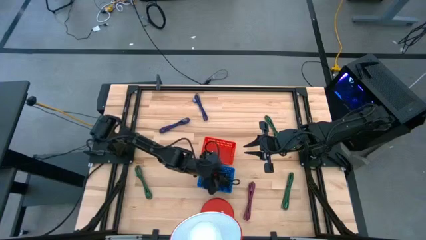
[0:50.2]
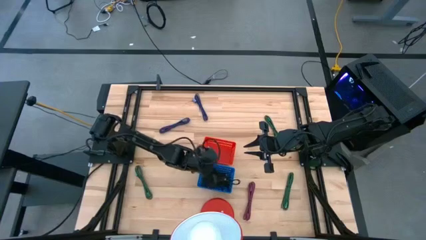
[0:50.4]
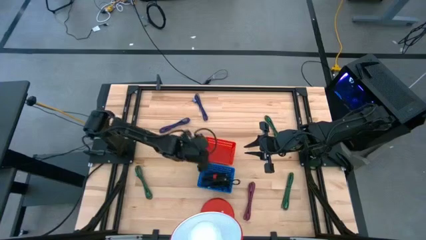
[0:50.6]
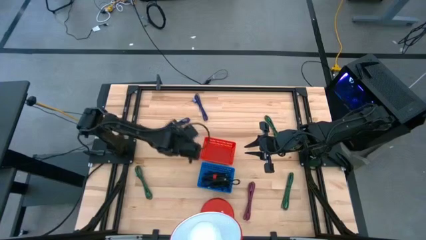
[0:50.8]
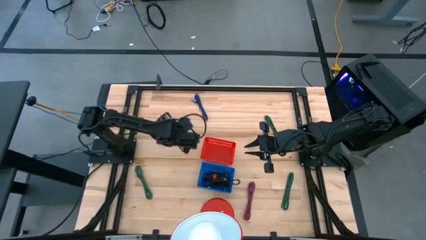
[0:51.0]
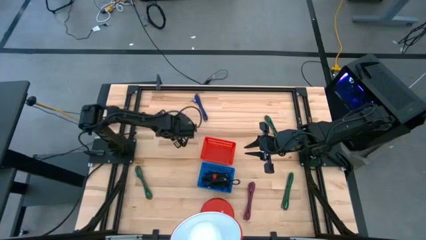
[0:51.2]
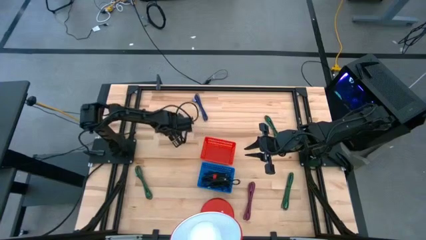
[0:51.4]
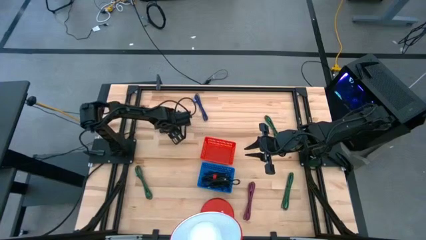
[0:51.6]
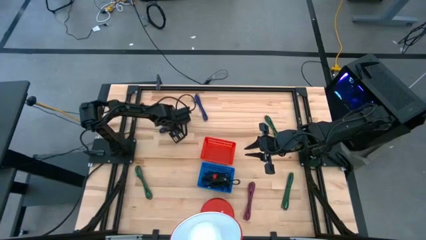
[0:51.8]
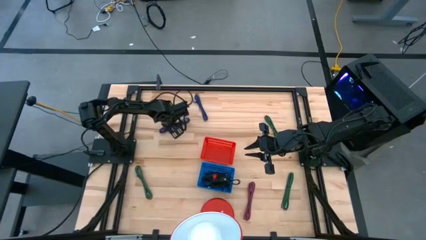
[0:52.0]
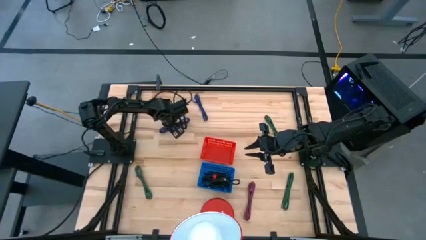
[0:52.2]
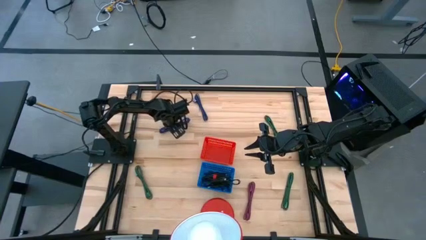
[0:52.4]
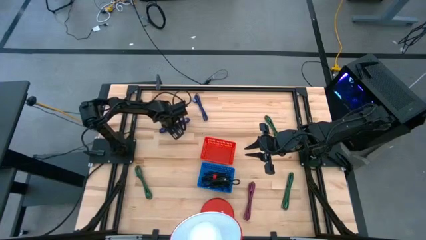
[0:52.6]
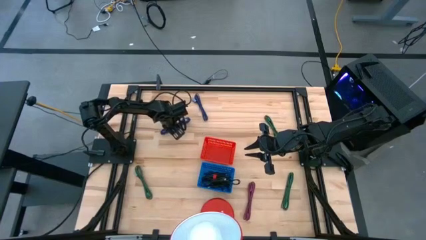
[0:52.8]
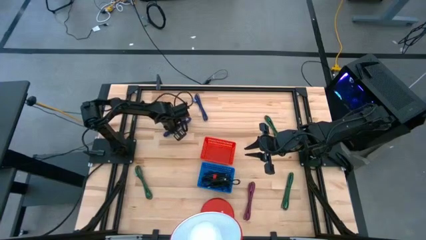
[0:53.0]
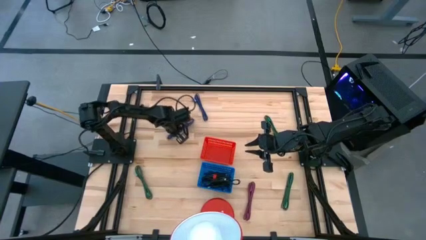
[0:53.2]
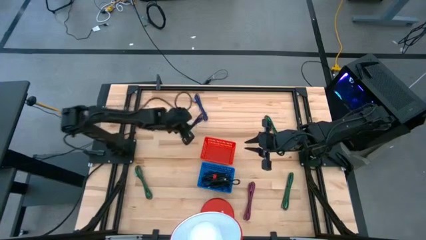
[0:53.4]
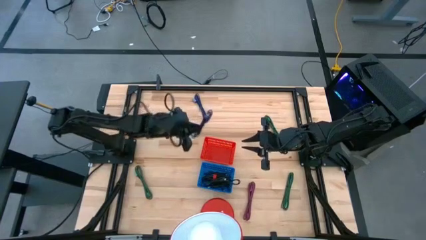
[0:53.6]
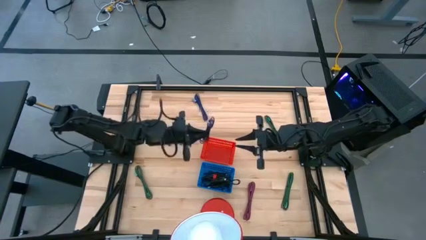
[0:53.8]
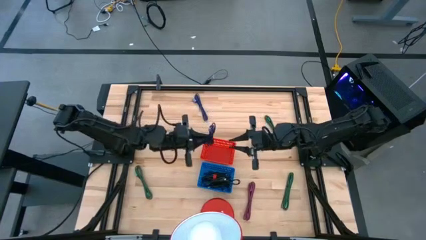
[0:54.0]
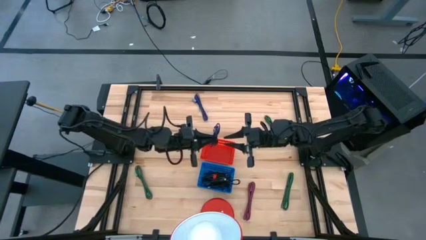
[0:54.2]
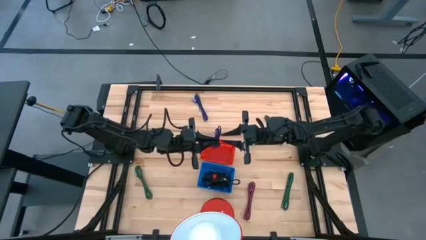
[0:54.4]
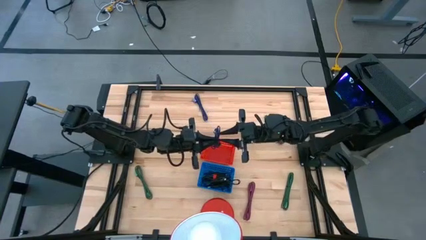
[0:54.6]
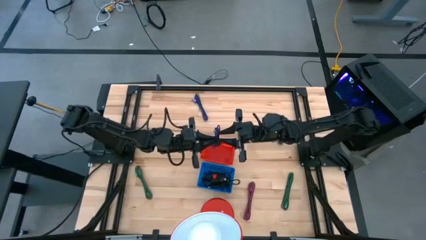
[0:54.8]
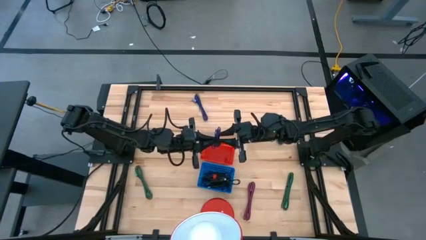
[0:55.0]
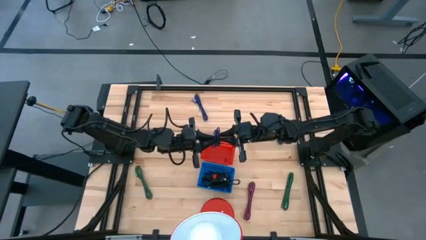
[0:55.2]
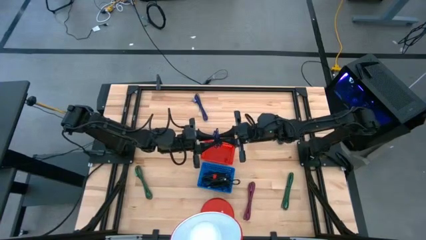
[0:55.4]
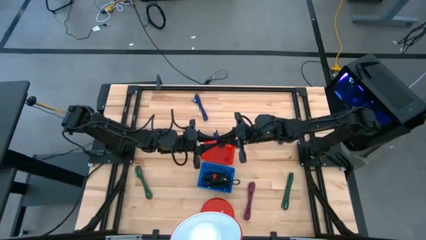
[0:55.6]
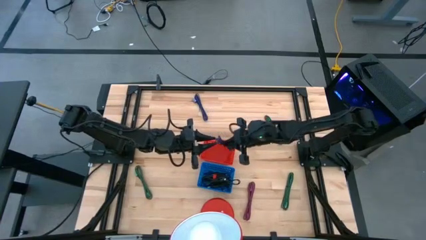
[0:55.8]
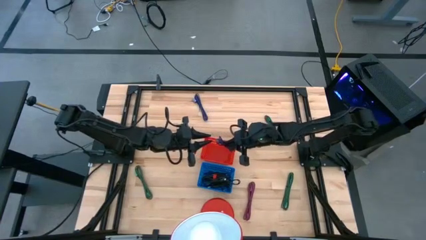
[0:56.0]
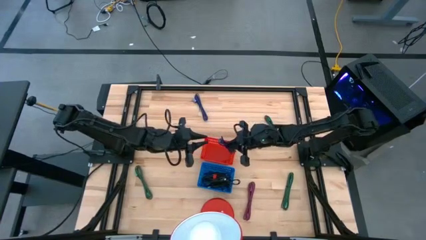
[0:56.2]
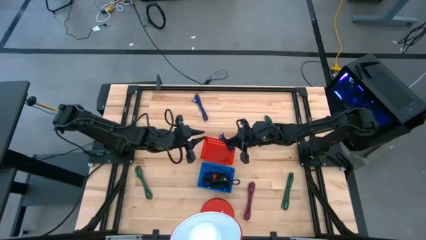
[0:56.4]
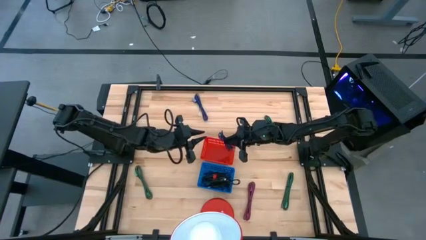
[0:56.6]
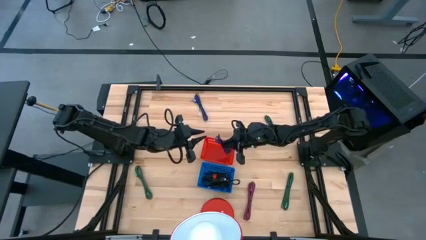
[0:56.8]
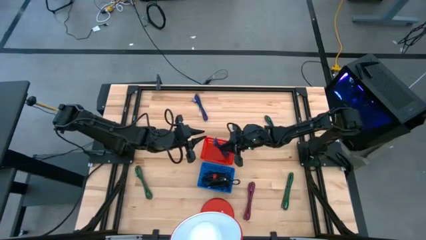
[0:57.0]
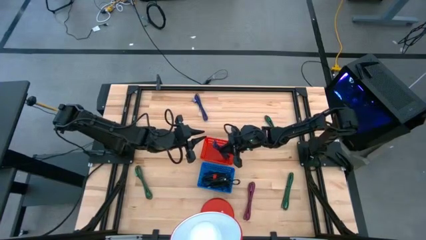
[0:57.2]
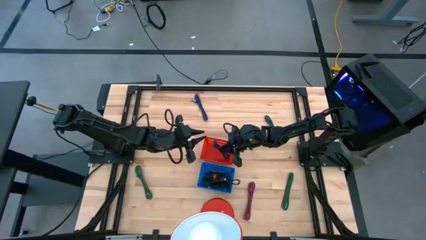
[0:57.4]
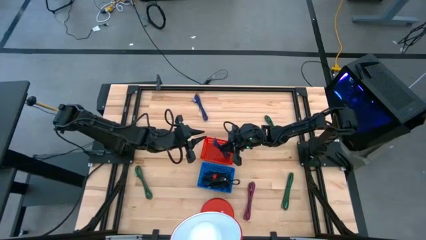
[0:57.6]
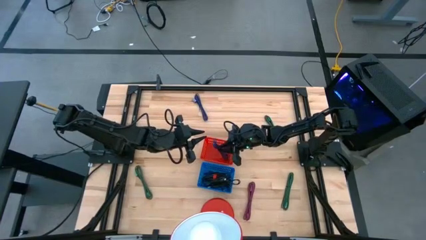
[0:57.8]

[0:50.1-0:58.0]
Task: Pick & Place USB Port
Put the large blue USB cable into the red bin

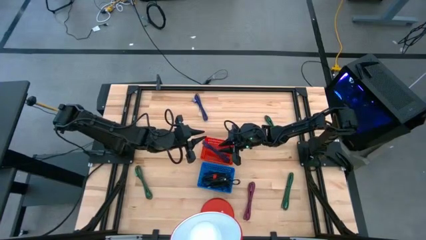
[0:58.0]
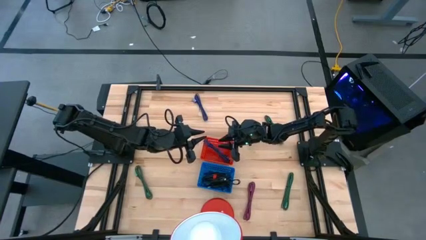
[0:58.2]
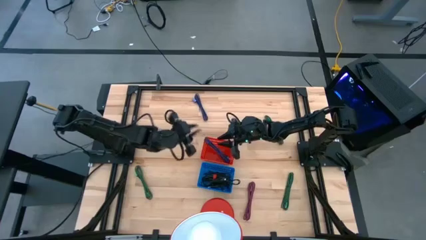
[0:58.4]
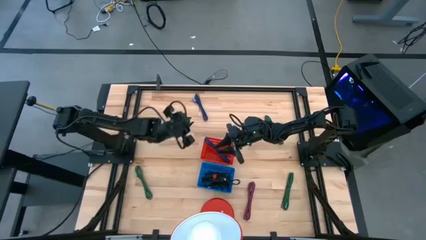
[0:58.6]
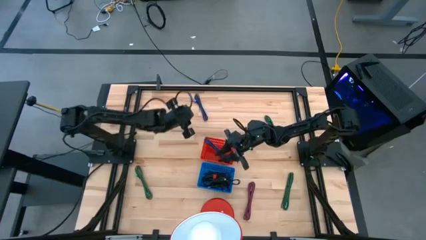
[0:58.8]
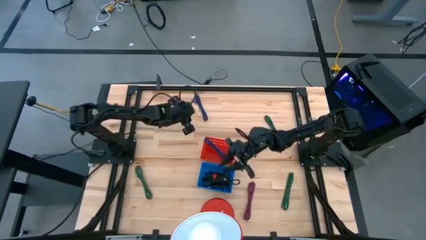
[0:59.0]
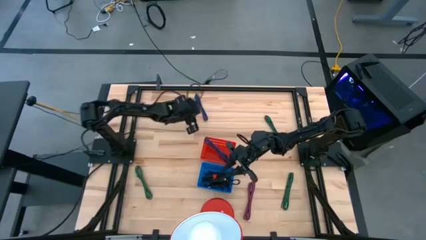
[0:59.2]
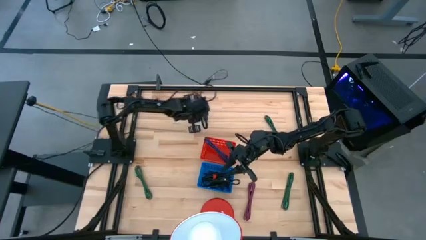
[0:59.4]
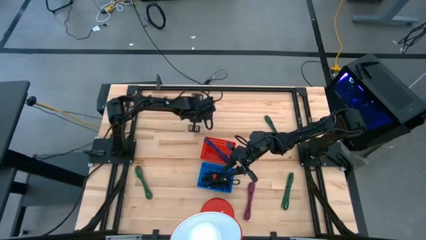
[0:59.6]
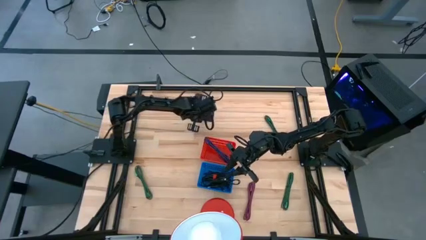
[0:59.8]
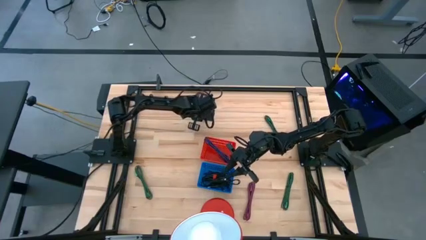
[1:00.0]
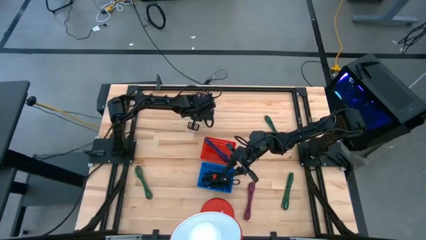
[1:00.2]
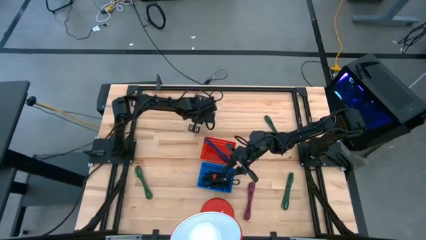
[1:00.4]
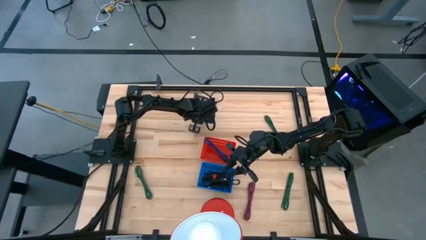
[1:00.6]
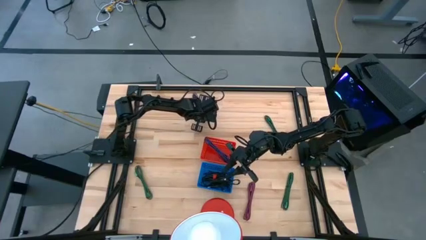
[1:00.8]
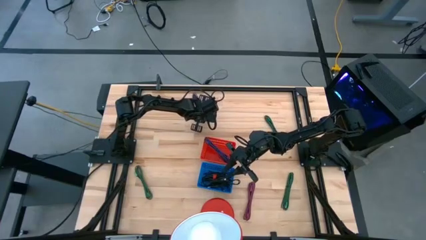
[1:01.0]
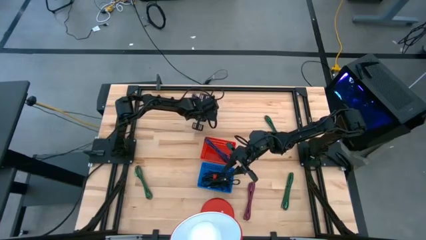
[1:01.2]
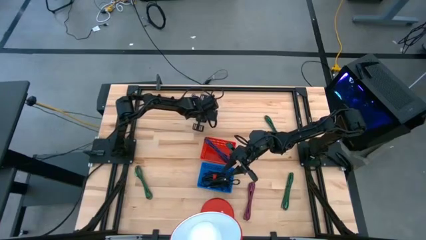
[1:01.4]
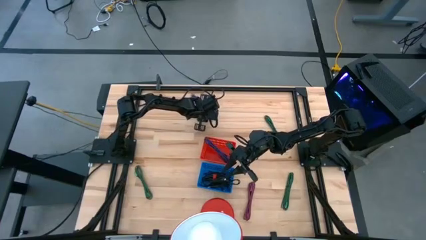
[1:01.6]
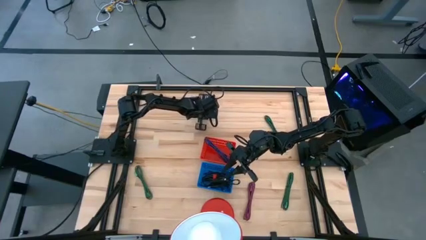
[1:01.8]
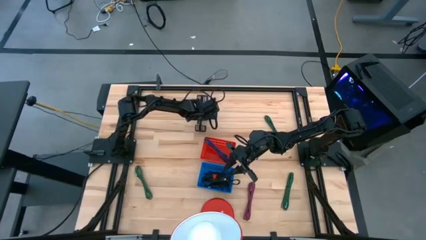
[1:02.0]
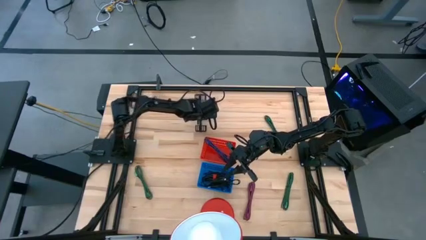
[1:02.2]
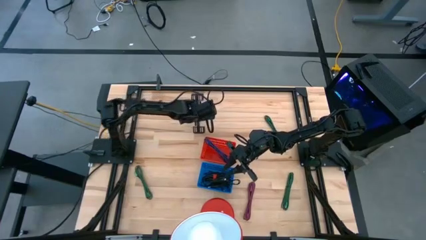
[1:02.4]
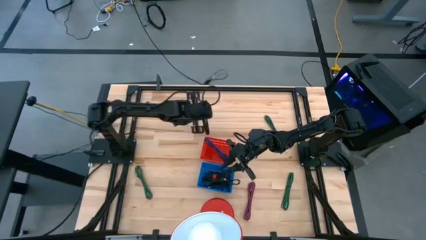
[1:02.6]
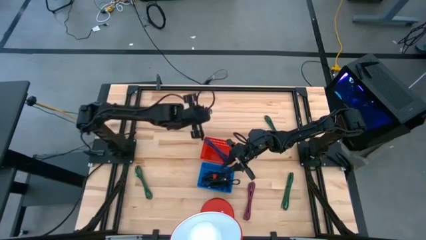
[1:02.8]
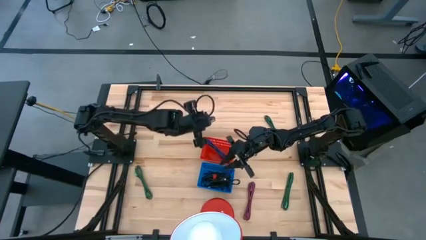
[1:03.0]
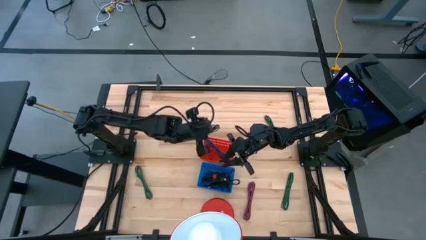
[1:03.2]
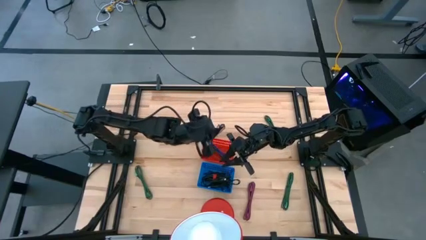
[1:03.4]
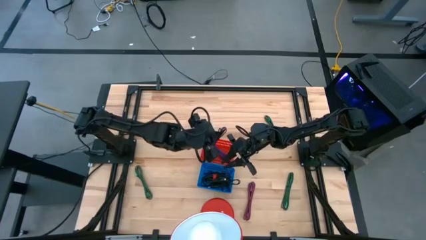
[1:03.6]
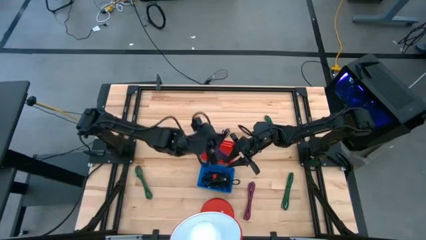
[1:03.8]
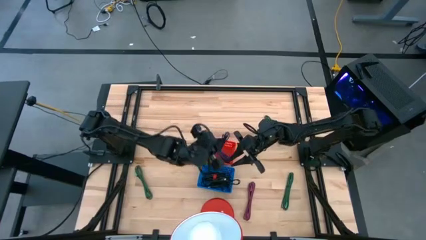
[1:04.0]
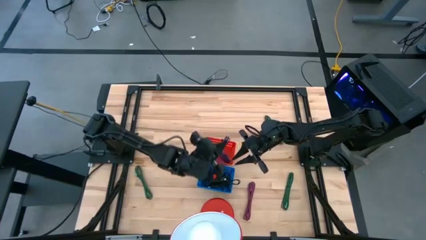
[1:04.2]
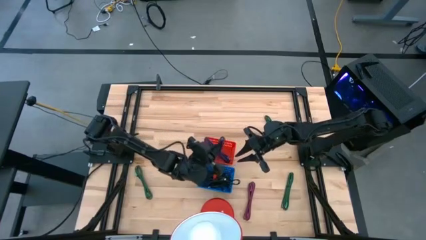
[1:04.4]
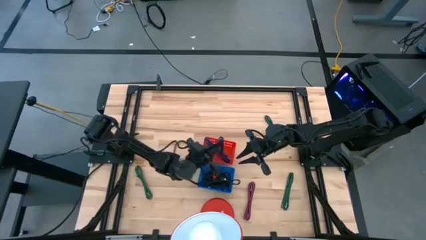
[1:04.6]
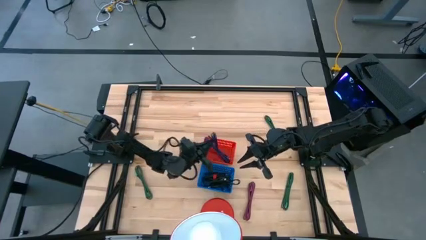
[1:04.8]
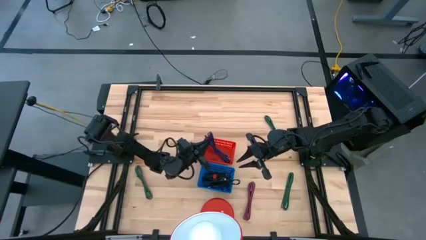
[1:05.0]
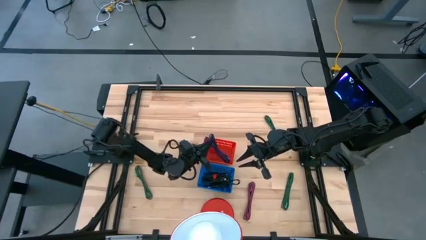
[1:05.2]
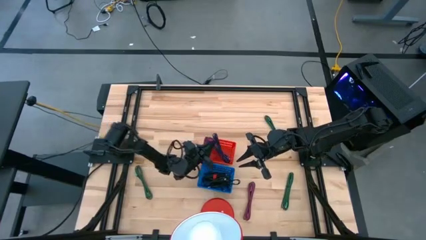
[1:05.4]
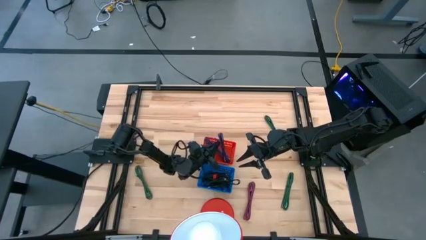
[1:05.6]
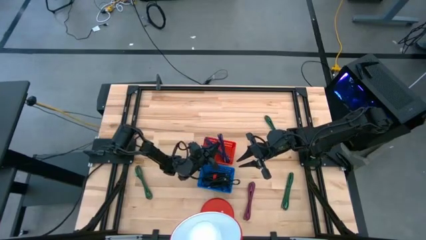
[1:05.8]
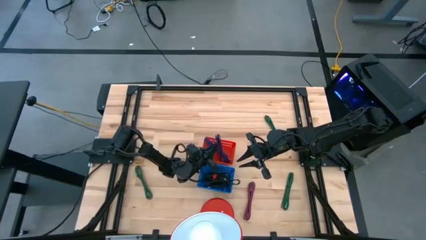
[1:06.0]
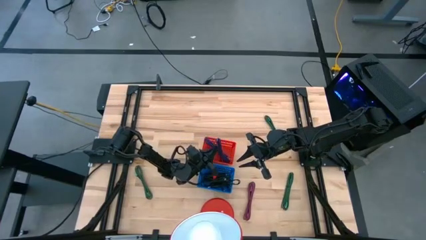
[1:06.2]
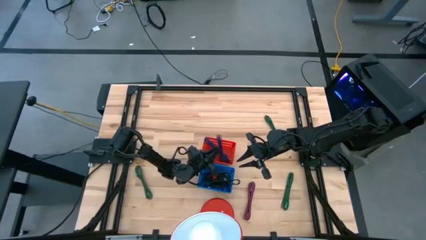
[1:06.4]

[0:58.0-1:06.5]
Put the large blue USB cable into the red bin
